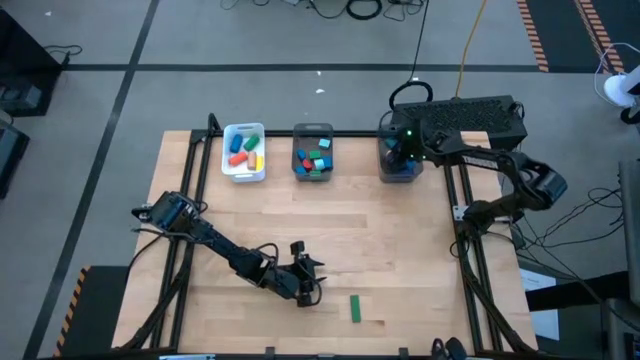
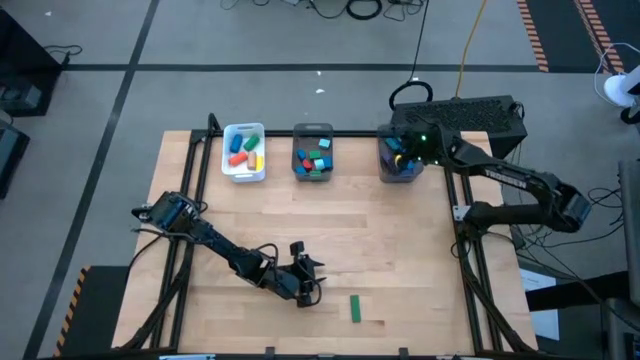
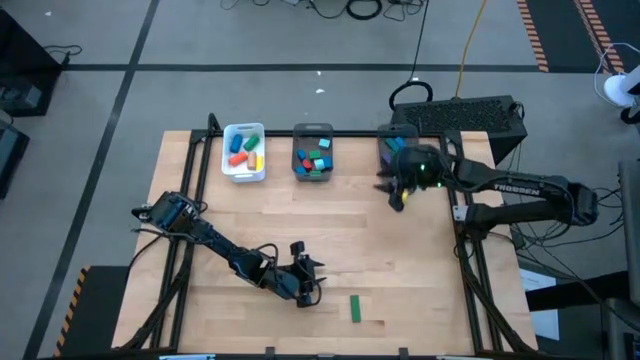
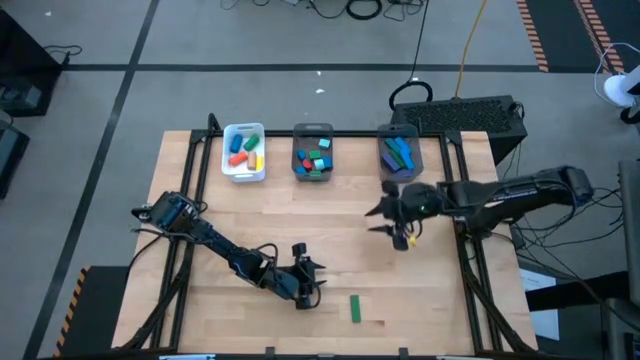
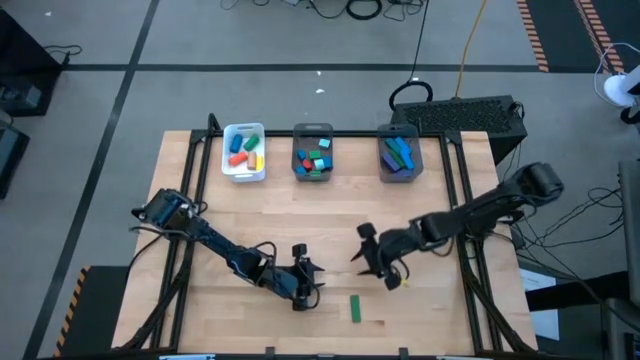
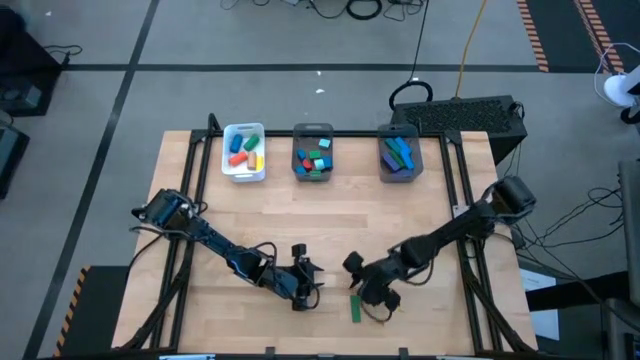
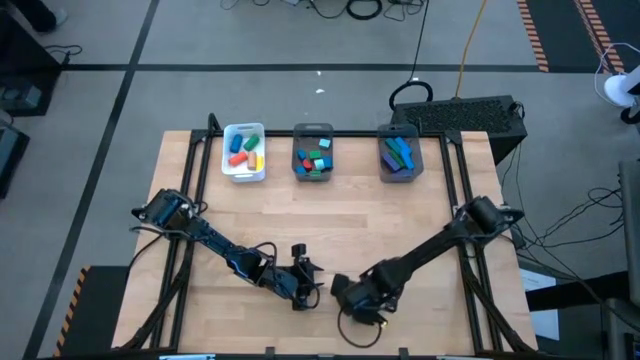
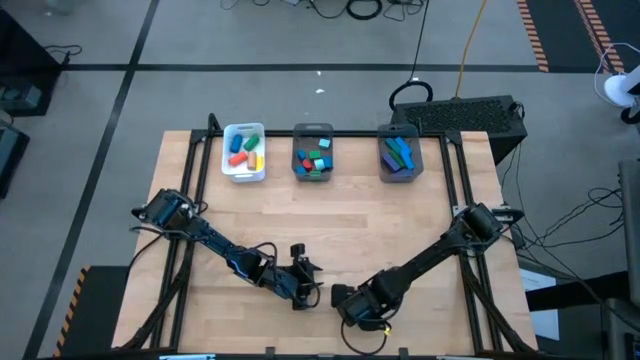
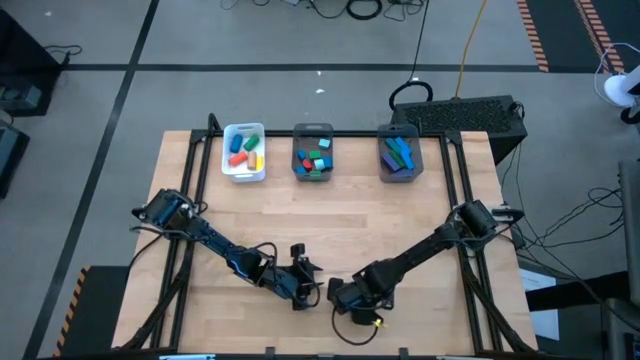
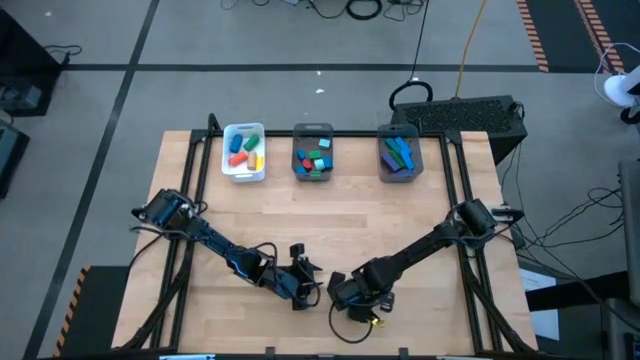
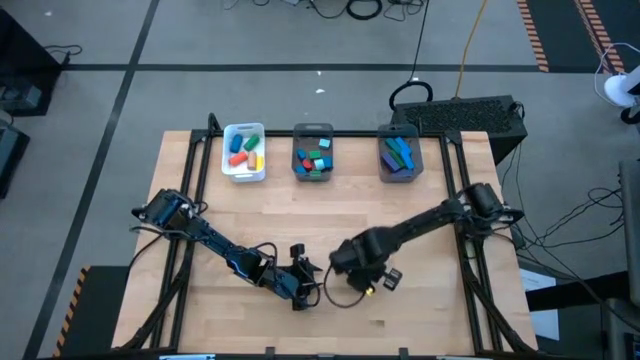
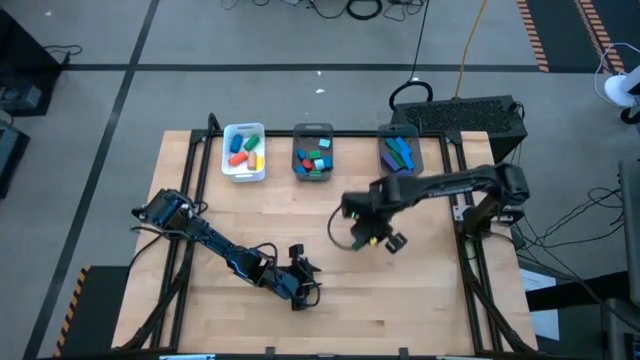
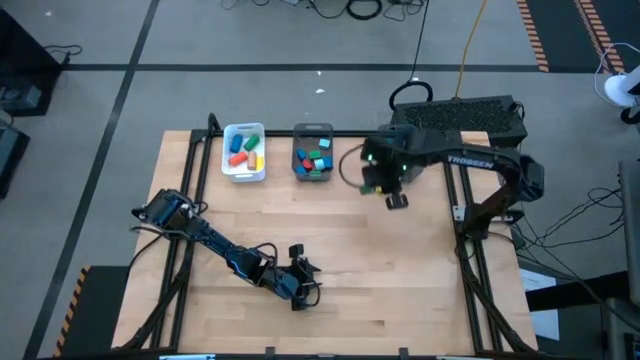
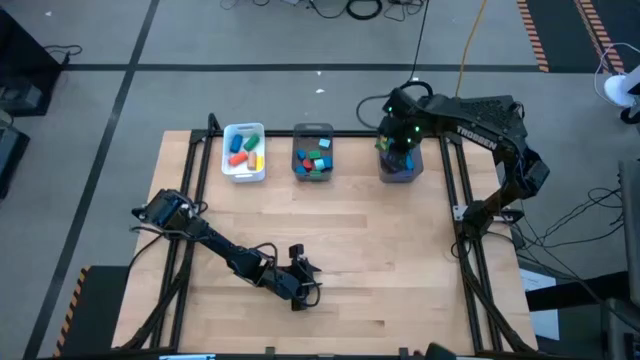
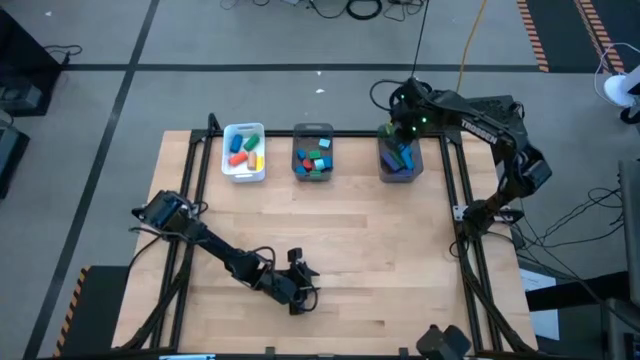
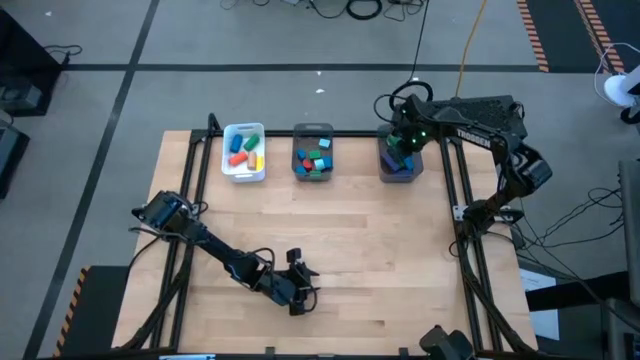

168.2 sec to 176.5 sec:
Task: Sort blocks by size
Put the green rectangular block into the right black bin

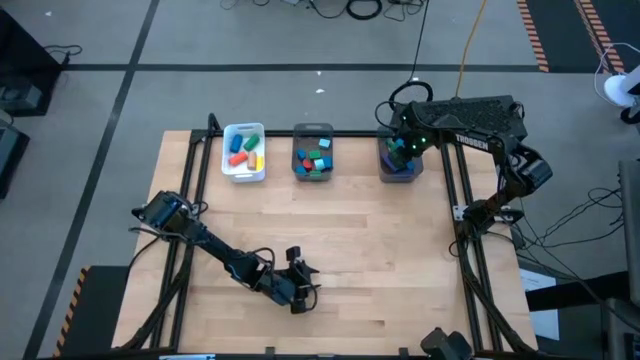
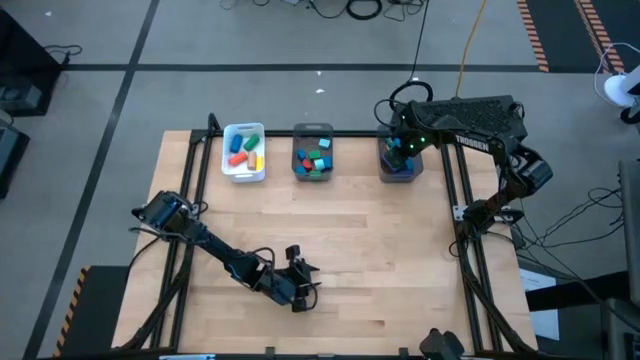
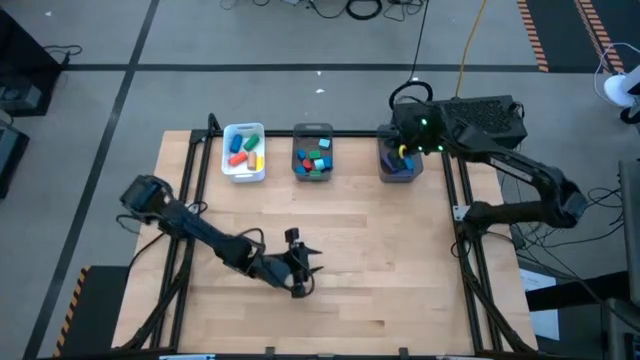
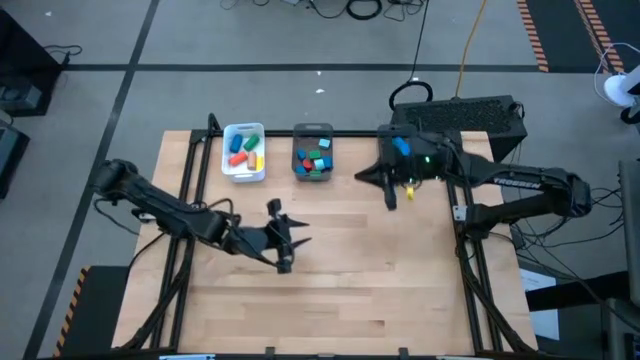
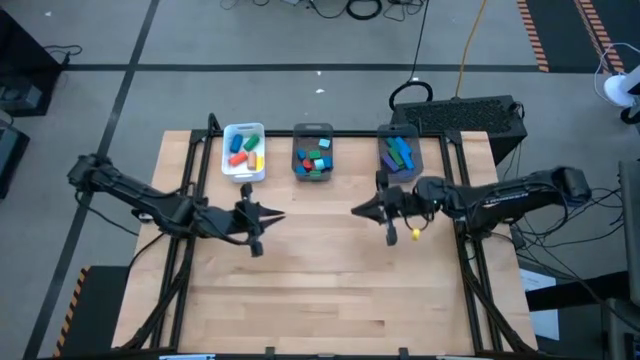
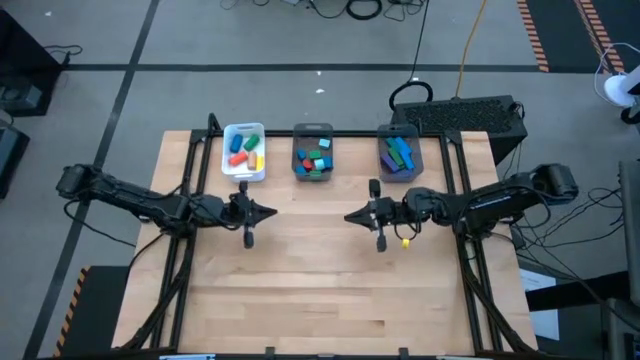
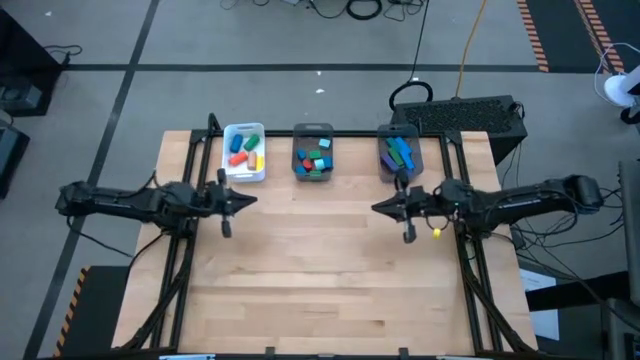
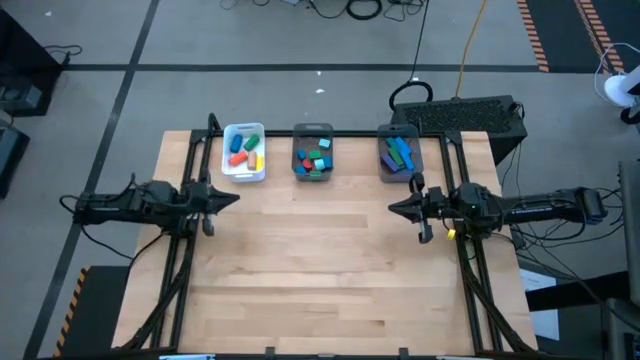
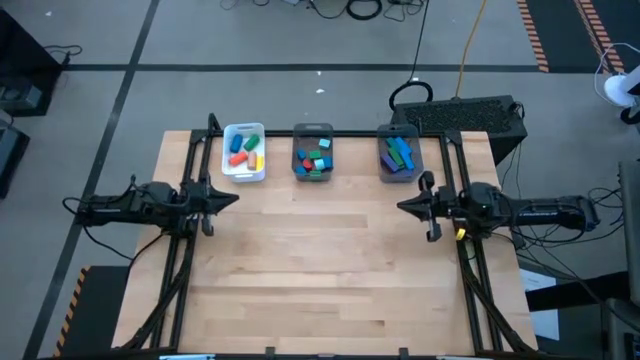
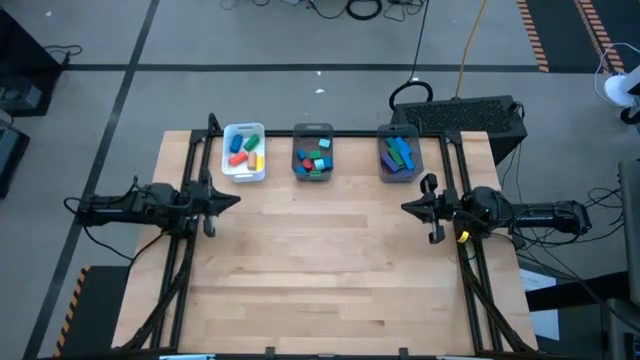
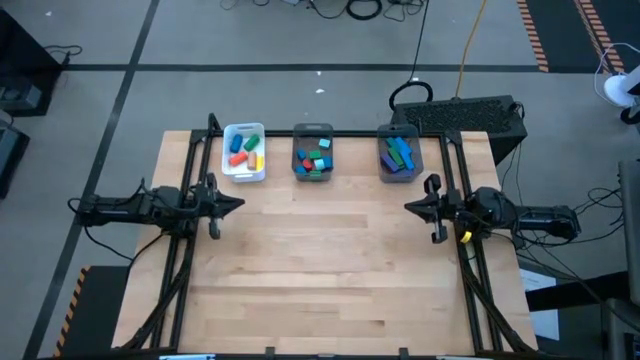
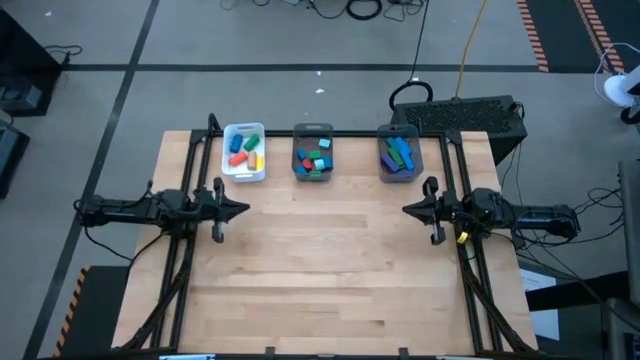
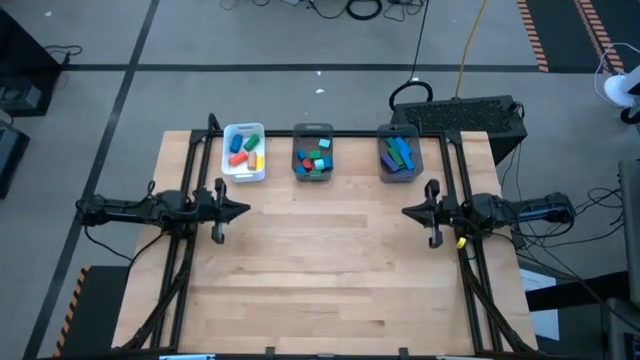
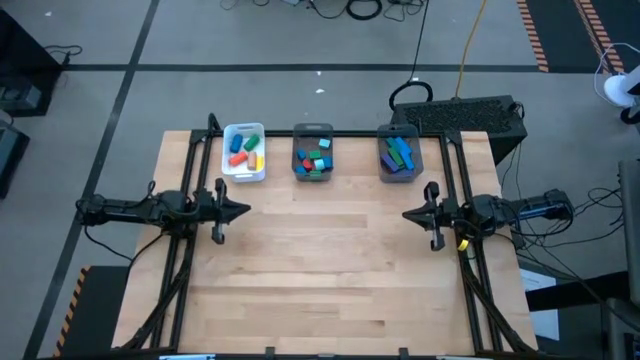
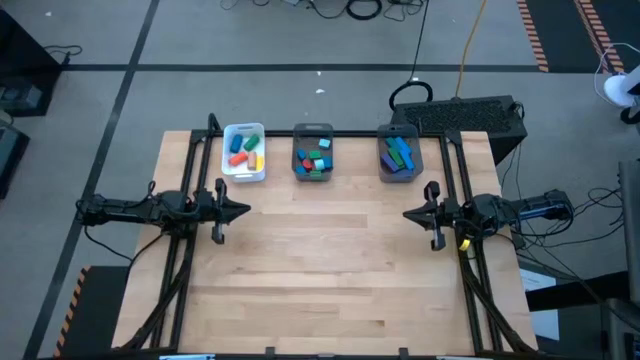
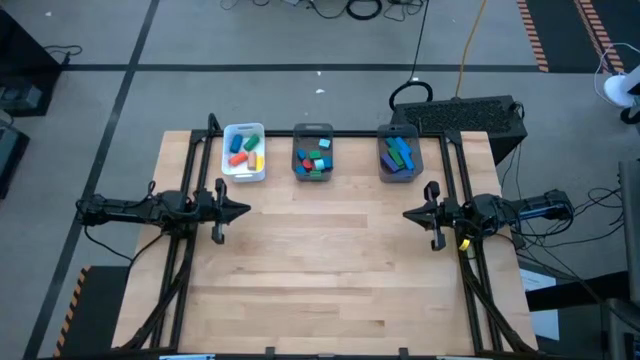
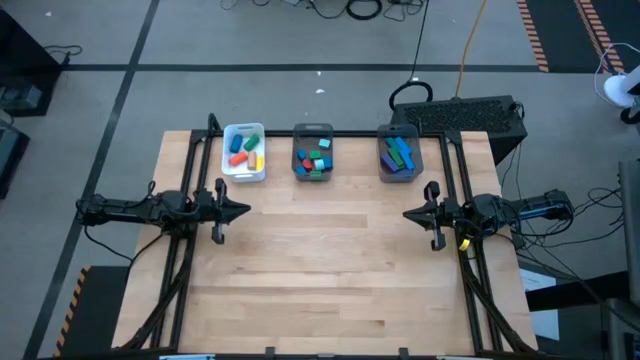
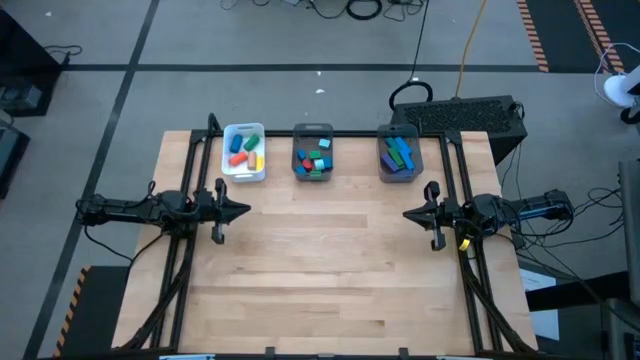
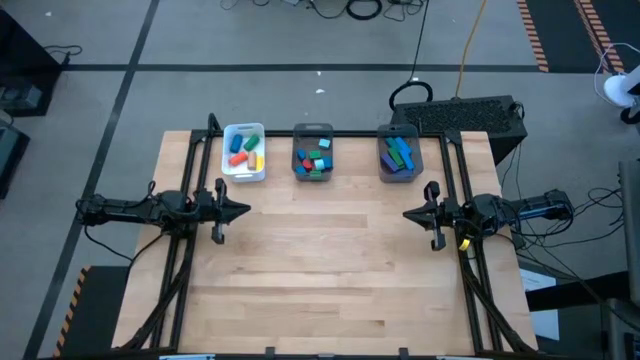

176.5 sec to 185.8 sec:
Return to Home Position

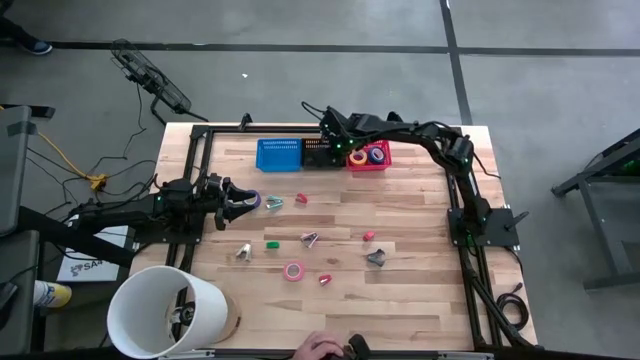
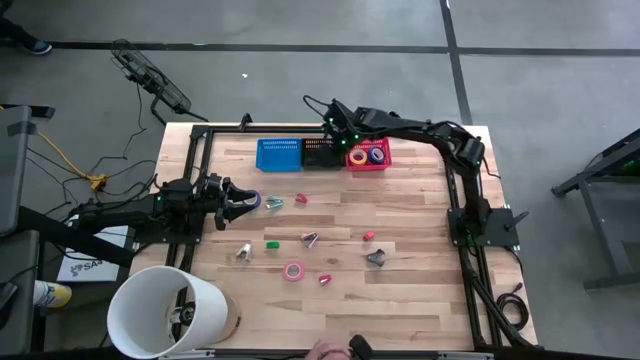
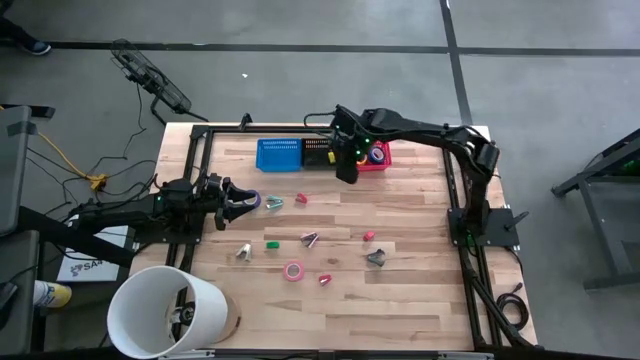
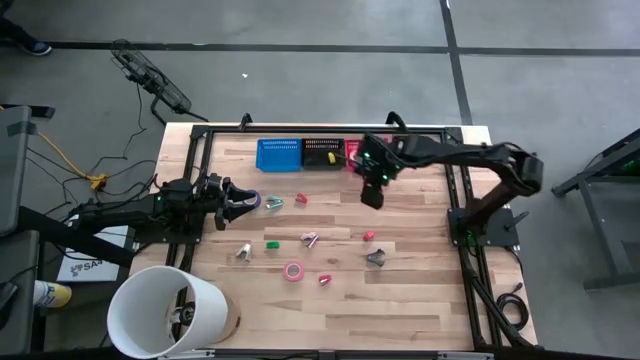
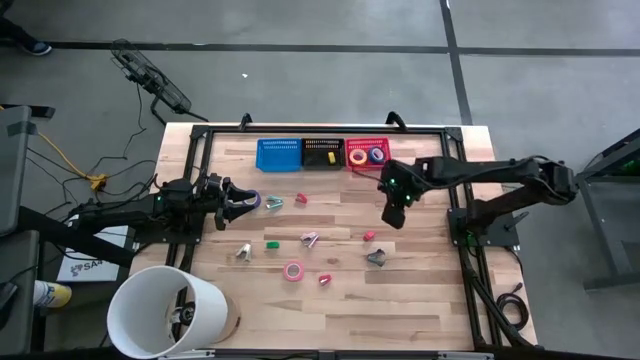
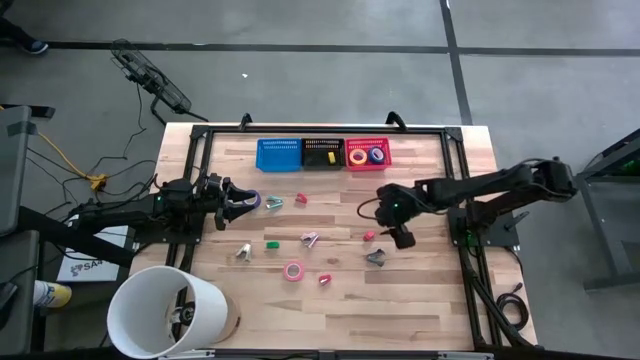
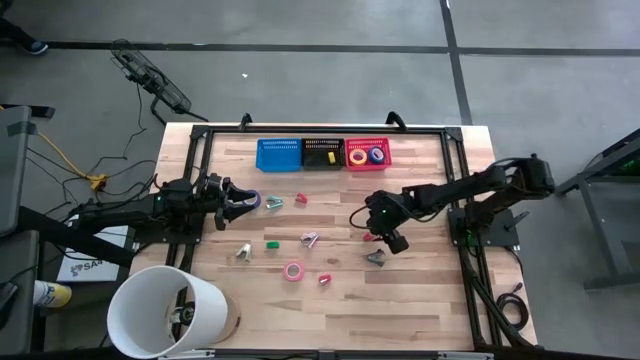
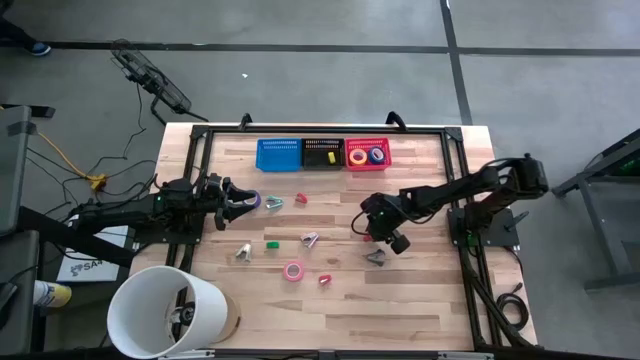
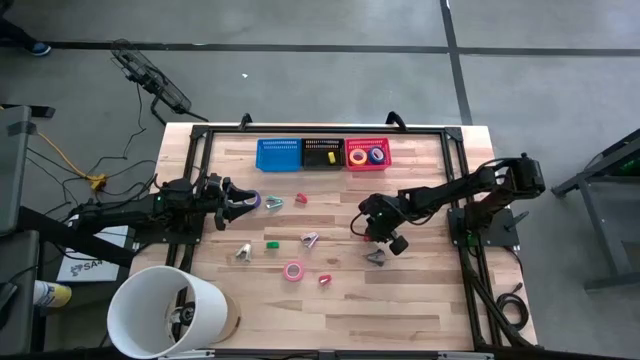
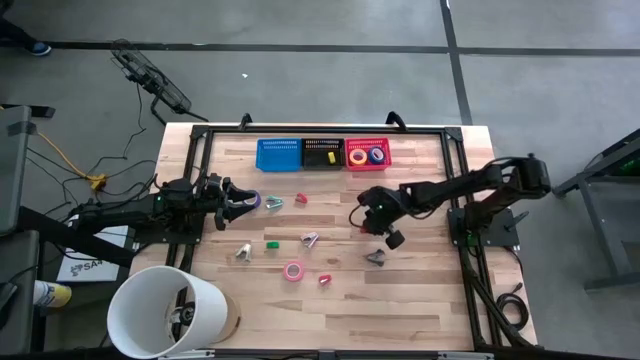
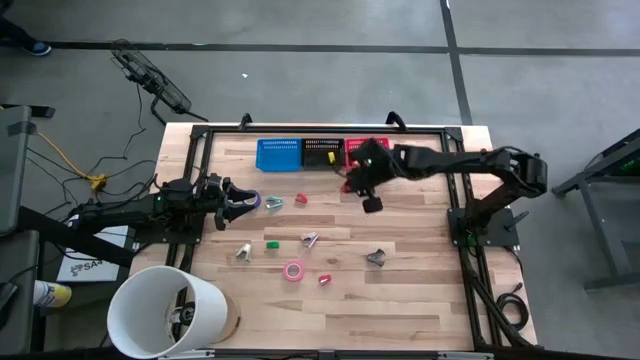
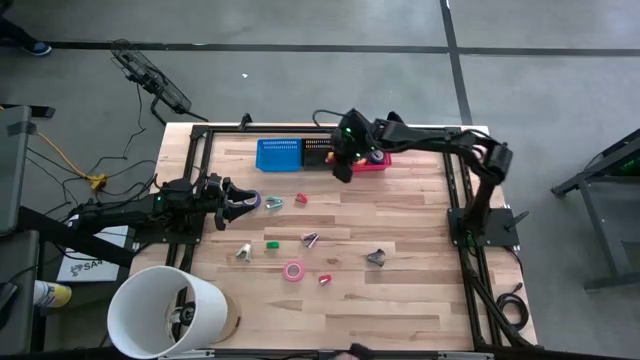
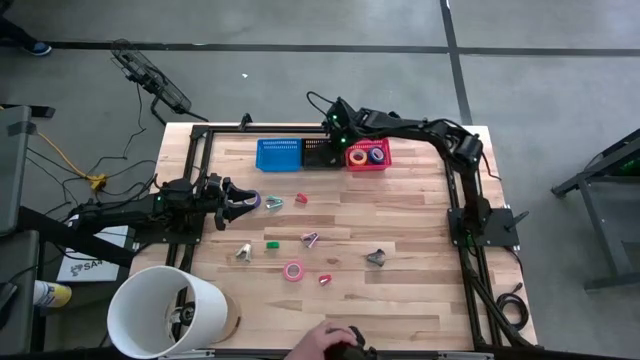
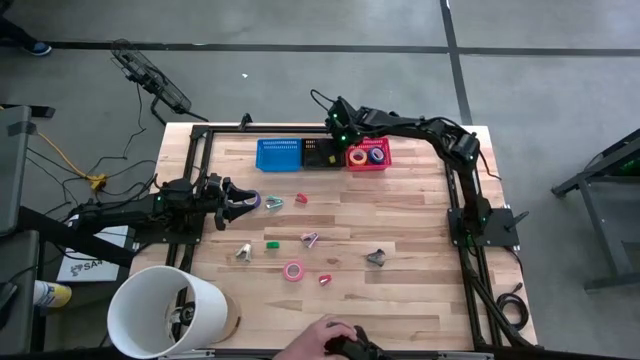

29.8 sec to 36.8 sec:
Task: Pick and place Stapler, Stapler remover, tape
Put the middle red stapler into the black bin
